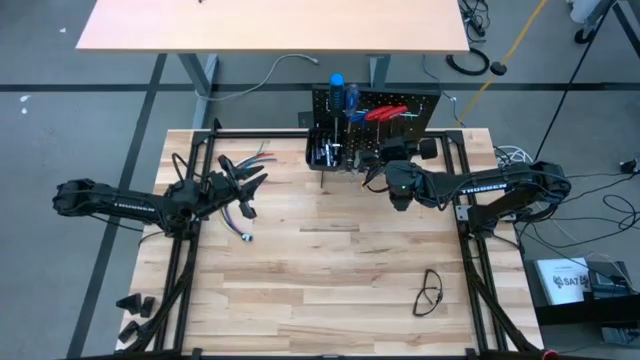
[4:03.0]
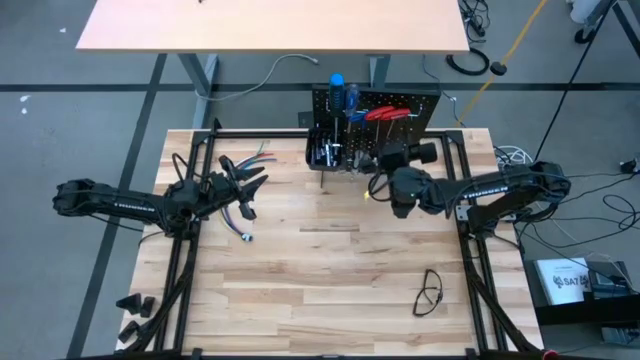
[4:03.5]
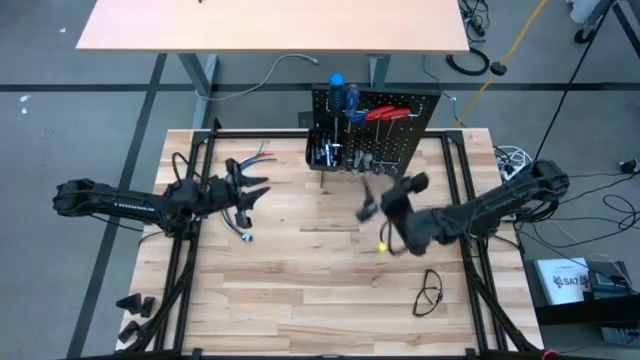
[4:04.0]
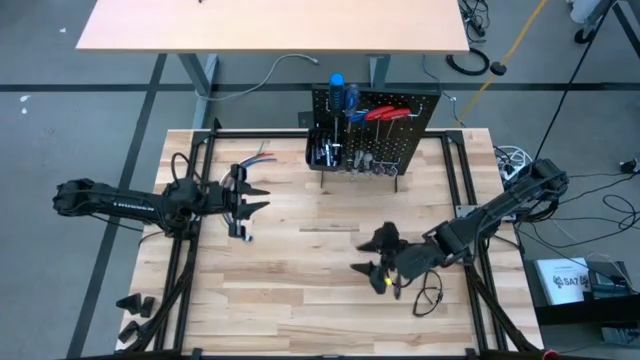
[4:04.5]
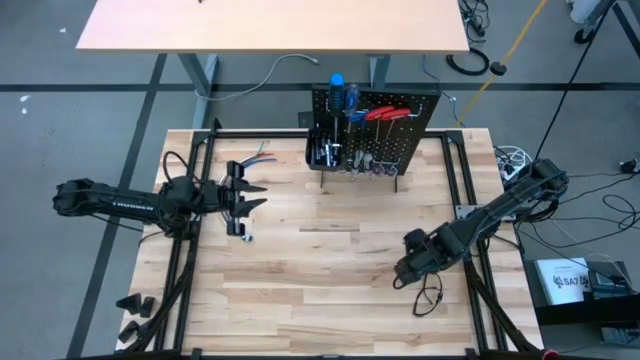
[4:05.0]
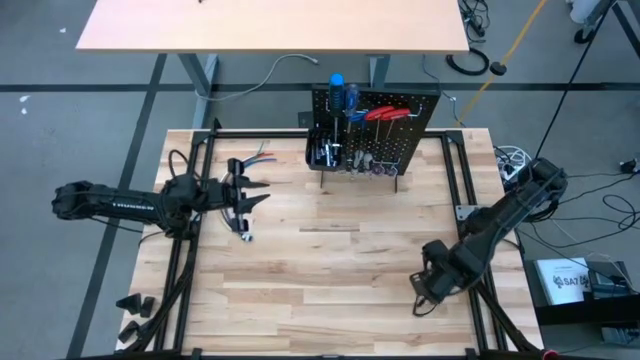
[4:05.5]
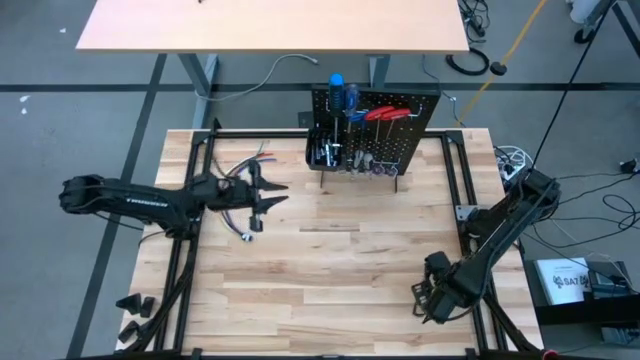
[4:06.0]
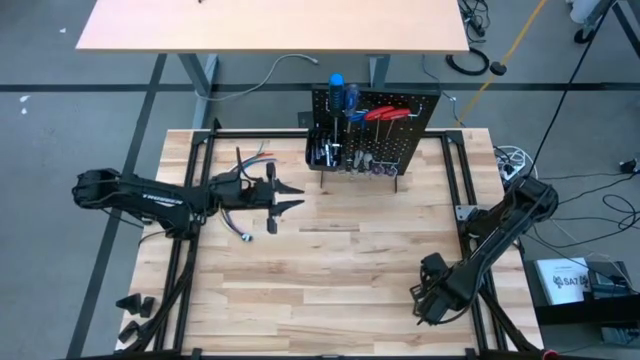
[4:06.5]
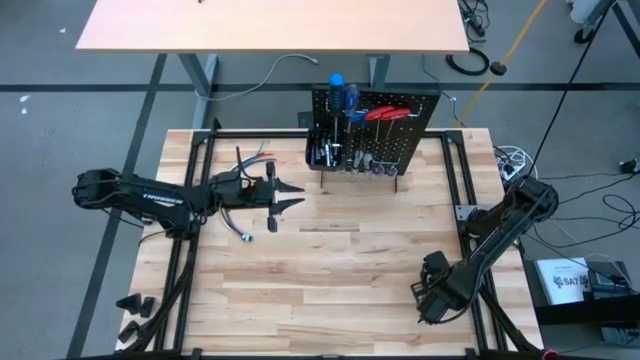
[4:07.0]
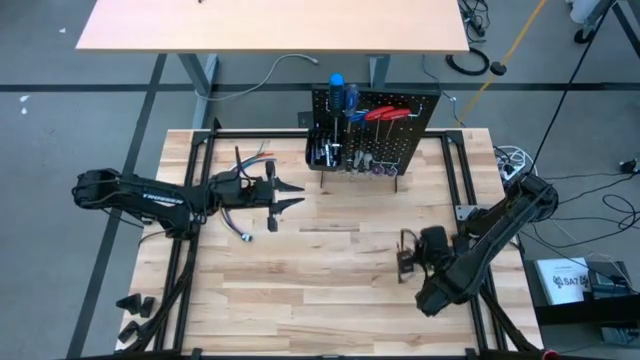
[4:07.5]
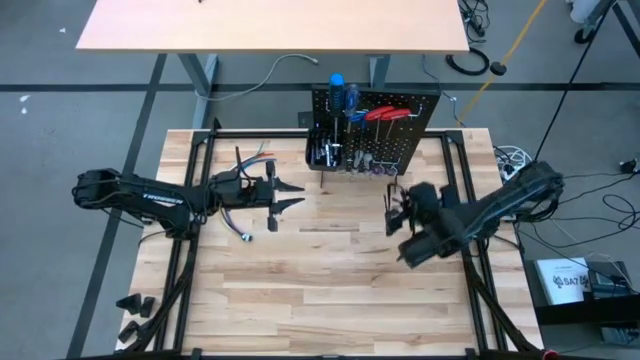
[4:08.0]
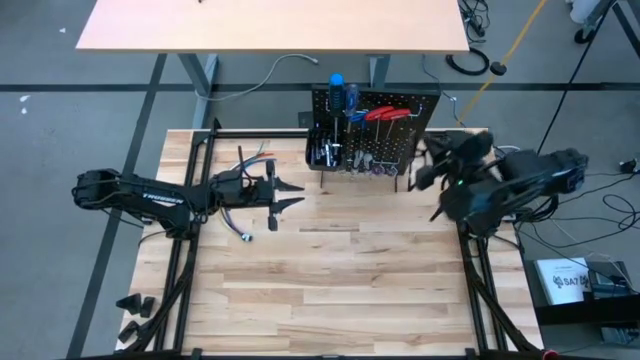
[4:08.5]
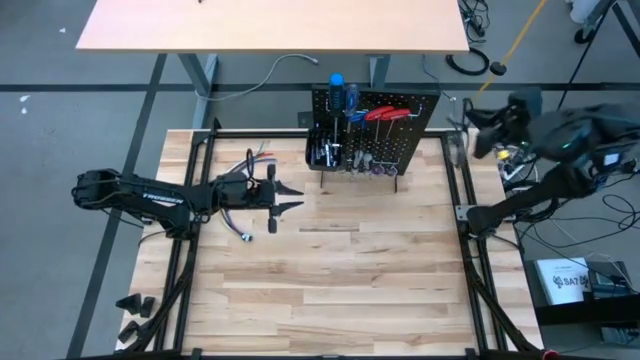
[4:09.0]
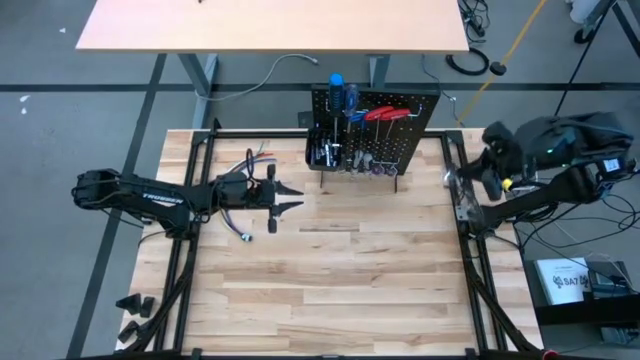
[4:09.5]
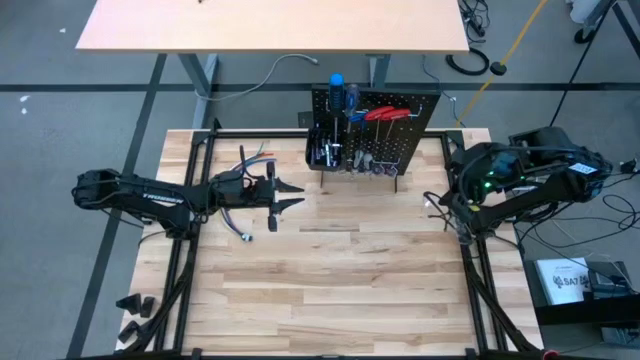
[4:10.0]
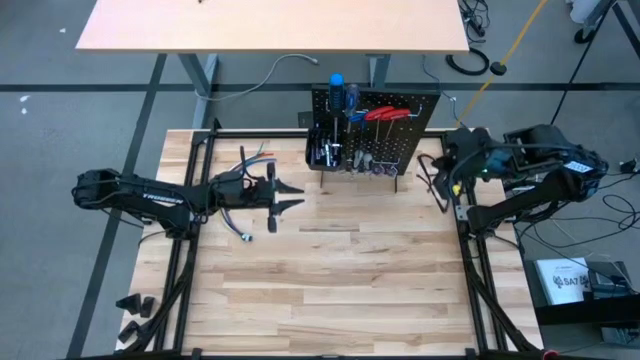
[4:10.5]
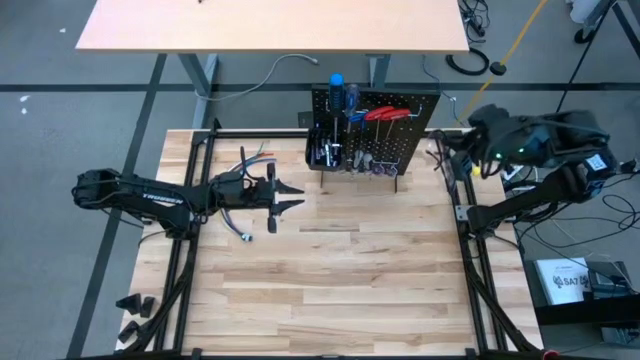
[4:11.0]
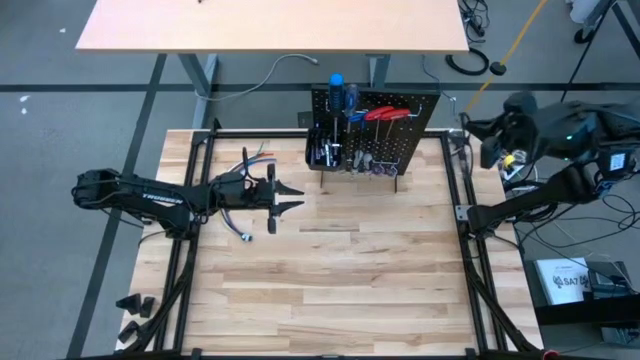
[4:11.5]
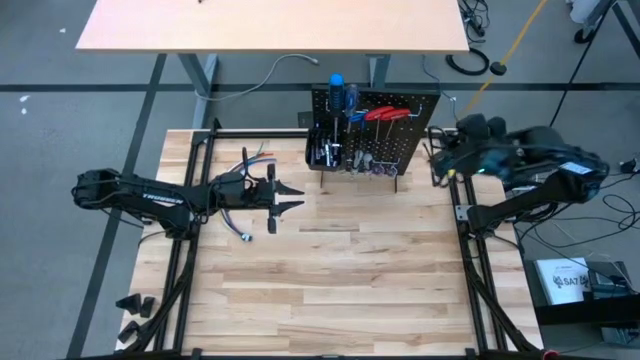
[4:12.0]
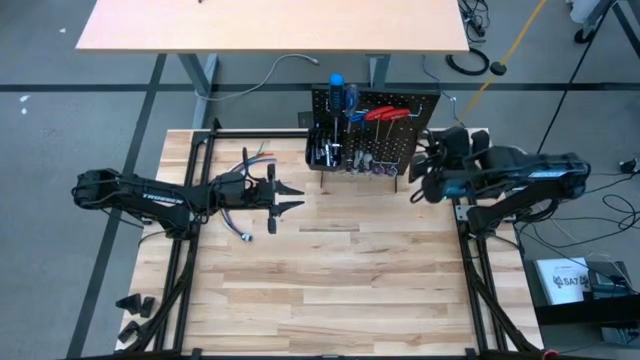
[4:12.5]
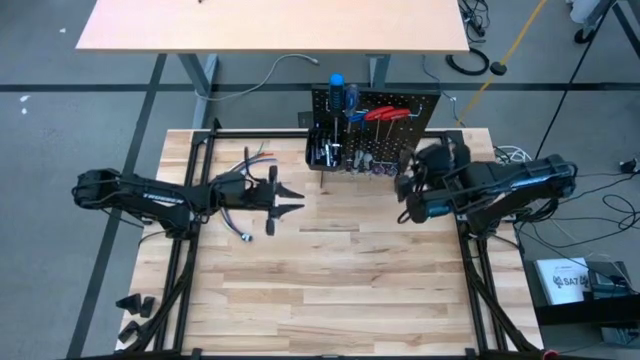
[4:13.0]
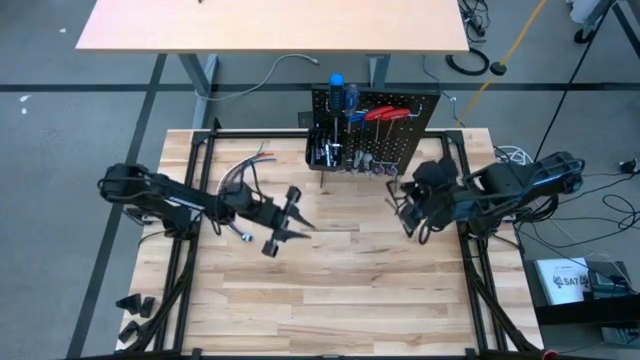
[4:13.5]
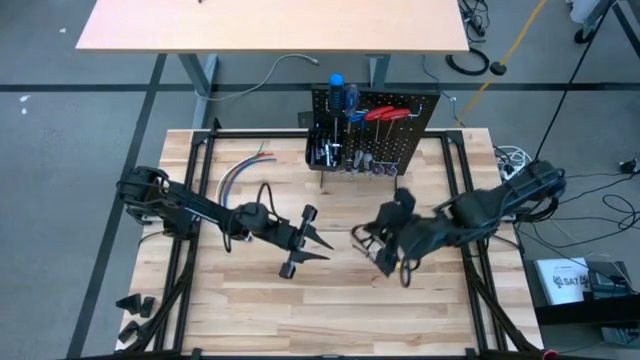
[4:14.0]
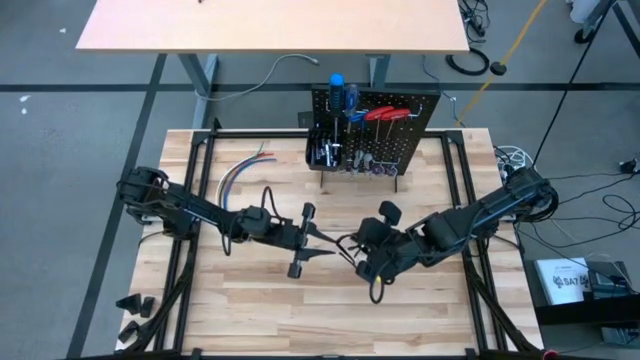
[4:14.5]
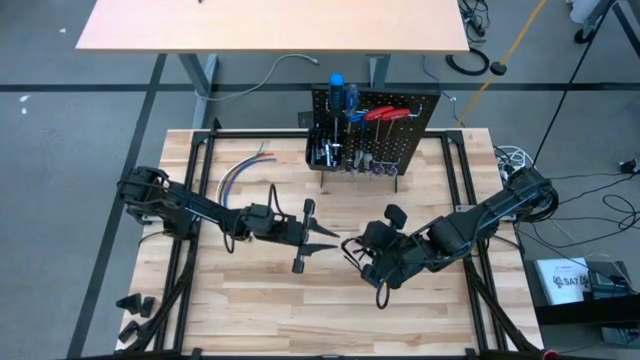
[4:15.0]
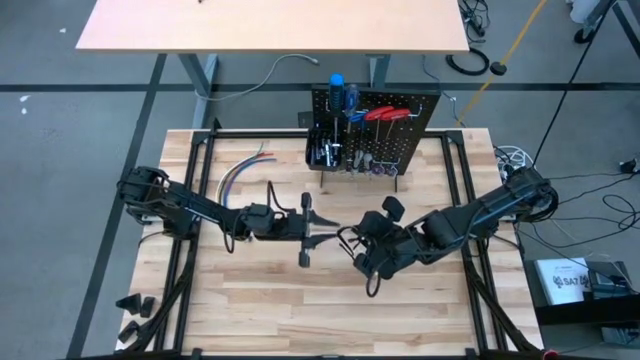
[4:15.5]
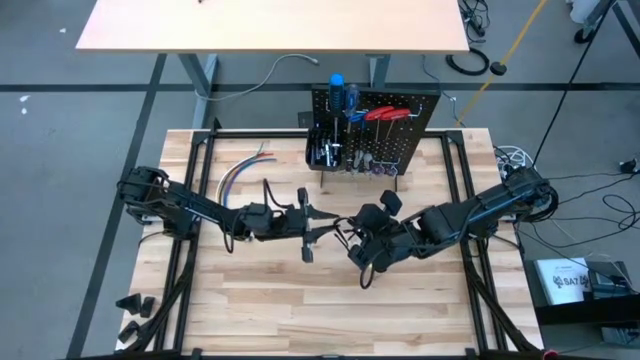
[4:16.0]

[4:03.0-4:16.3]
Task: Hang tools onto peg board
Hang the black safety goggles on the peg board

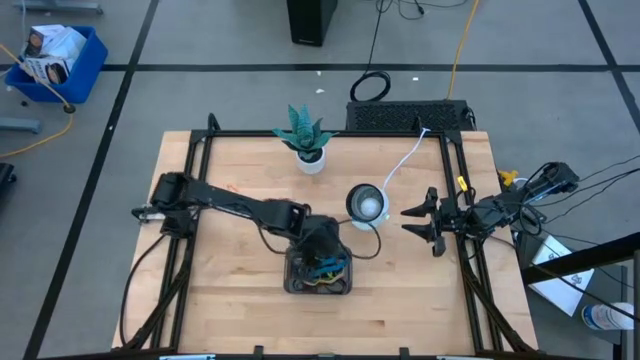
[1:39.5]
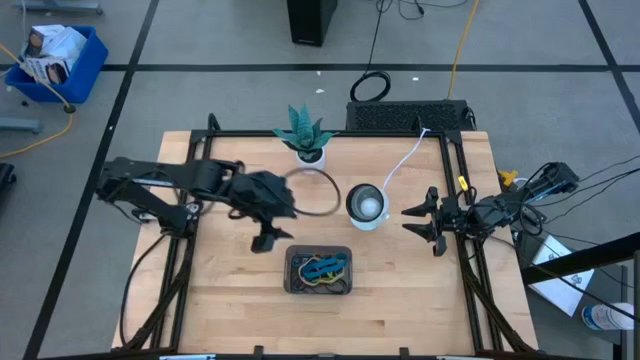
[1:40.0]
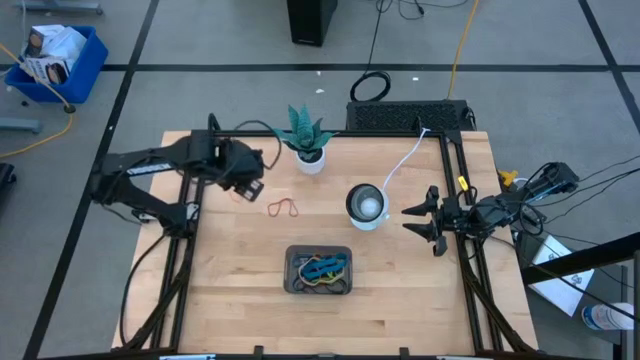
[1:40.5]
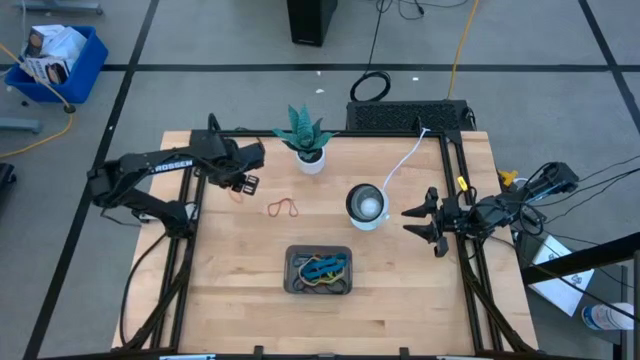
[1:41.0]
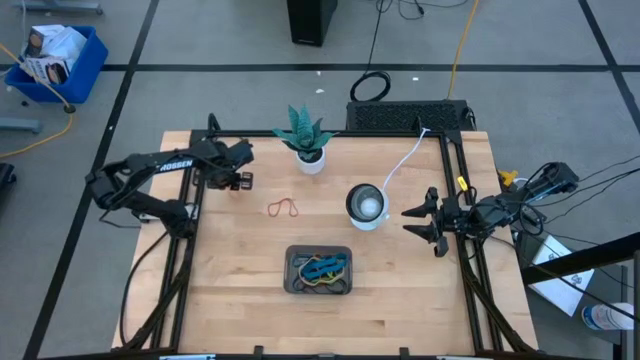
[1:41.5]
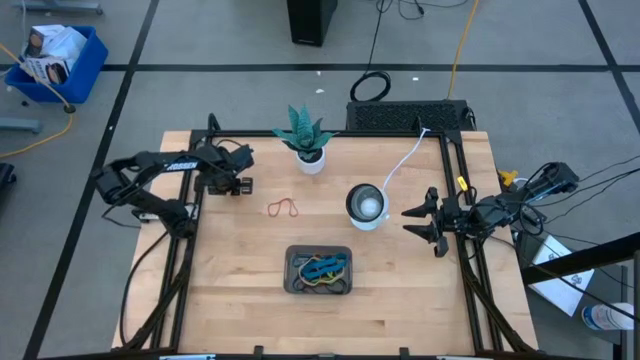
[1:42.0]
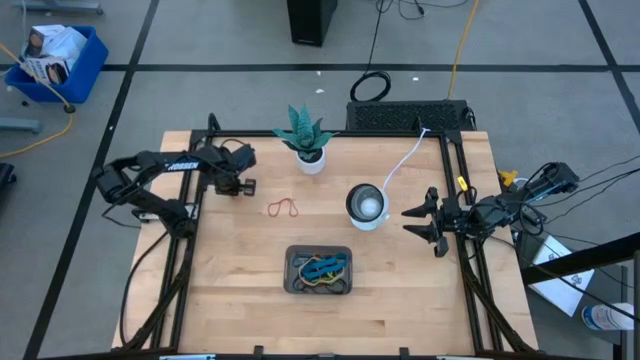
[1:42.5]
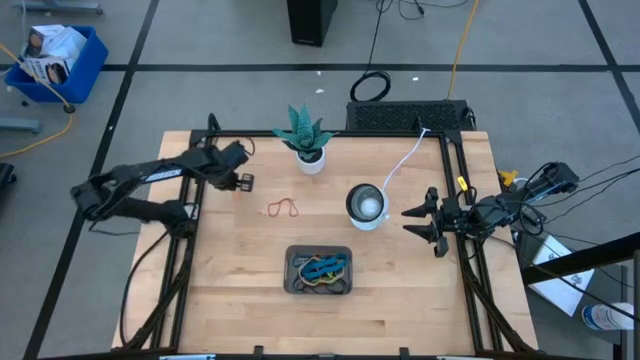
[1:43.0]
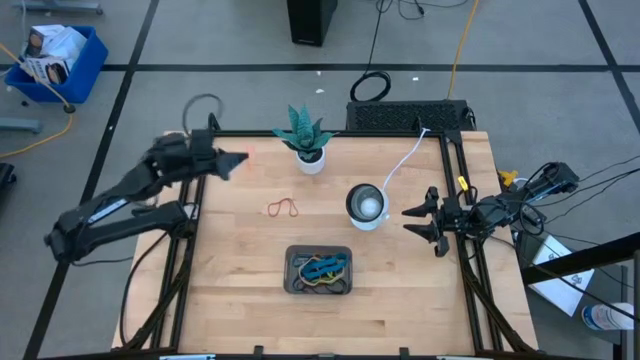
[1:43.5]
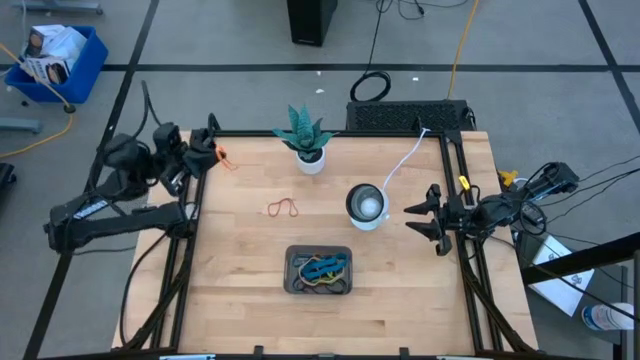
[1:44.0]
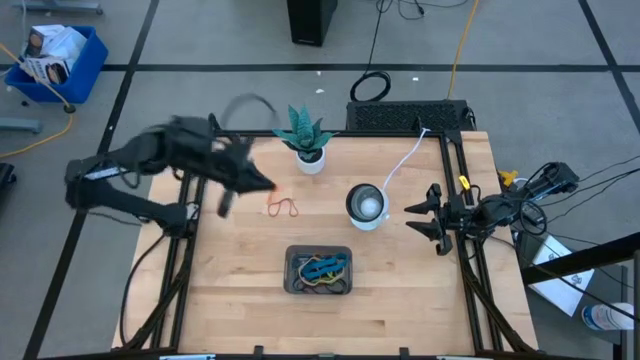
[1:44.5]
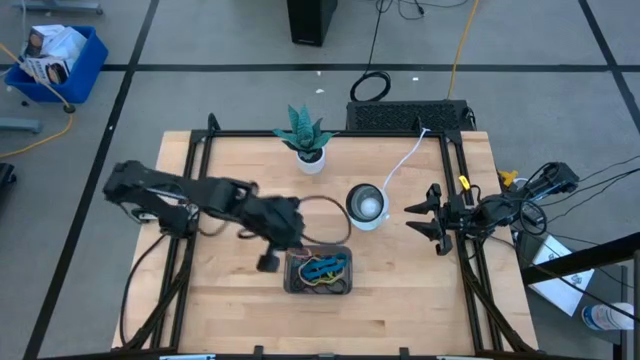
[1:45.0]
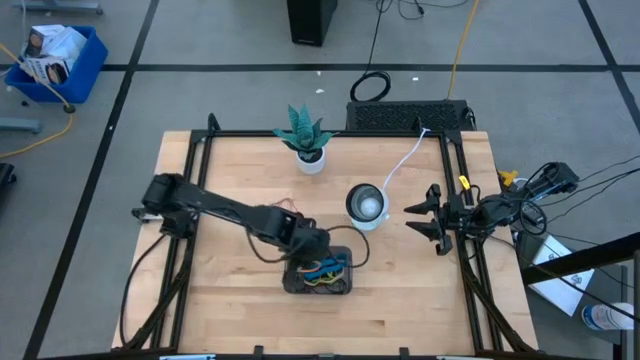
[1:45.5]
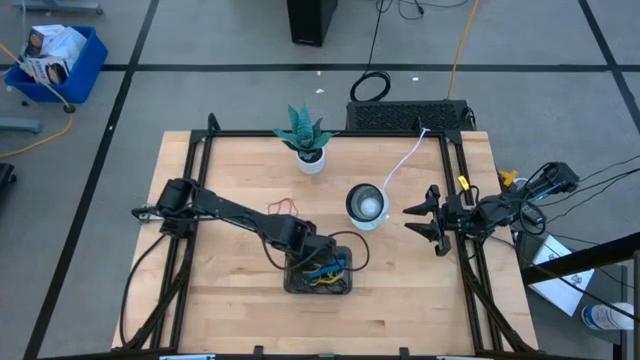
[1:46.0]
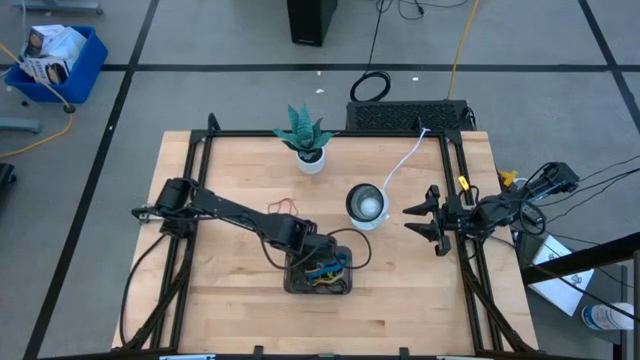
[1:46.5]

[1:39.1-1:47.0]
Task: Pick and place rubber bands into bin
Put the orange rubber band into the gray bin
